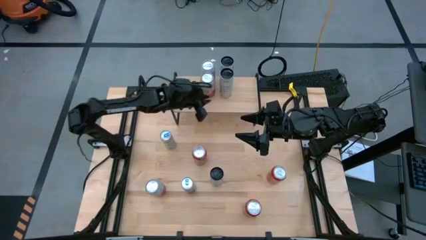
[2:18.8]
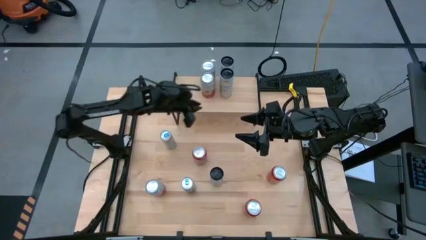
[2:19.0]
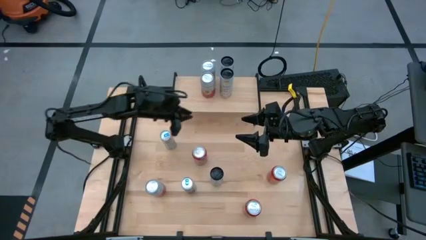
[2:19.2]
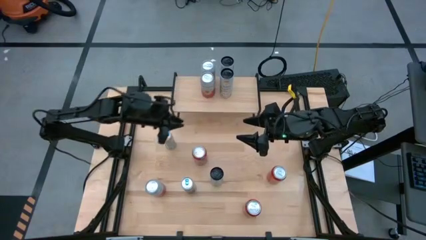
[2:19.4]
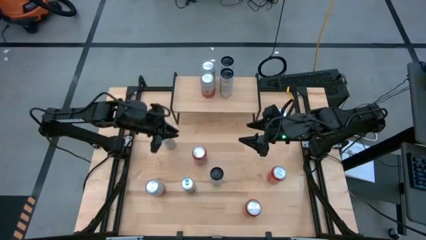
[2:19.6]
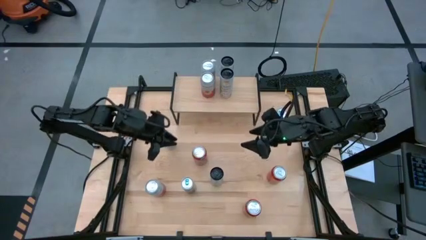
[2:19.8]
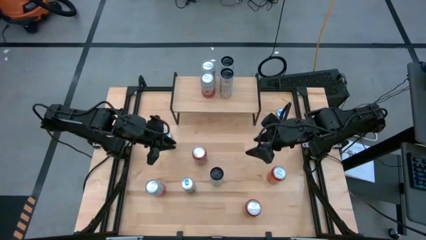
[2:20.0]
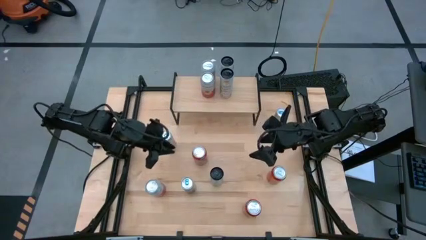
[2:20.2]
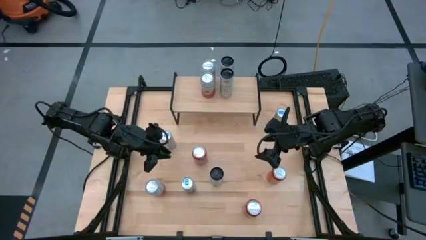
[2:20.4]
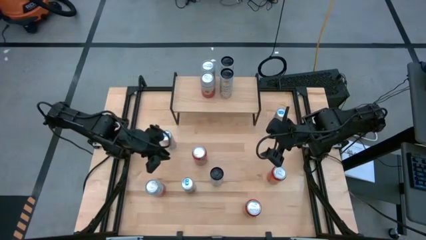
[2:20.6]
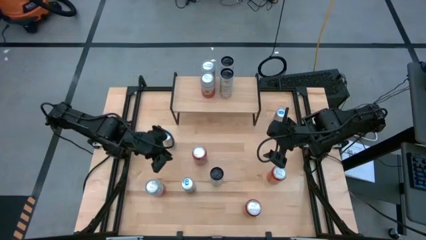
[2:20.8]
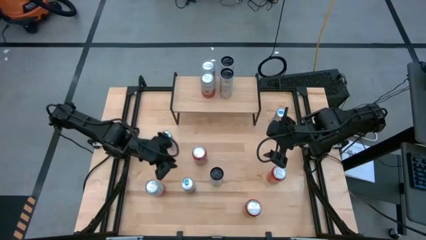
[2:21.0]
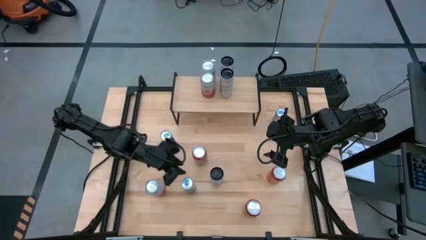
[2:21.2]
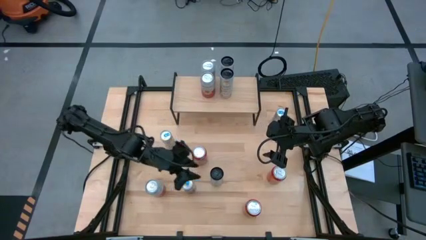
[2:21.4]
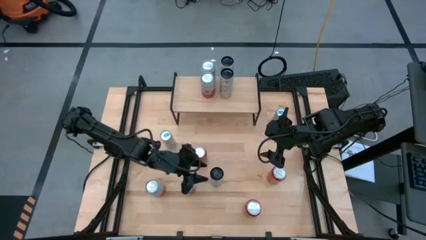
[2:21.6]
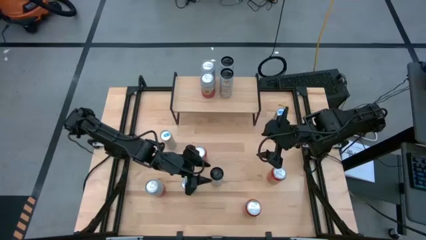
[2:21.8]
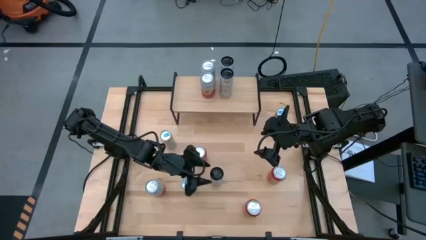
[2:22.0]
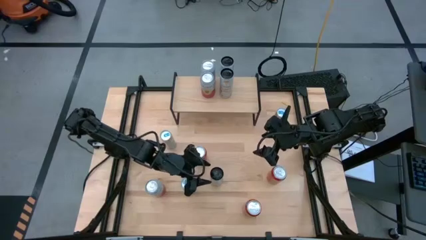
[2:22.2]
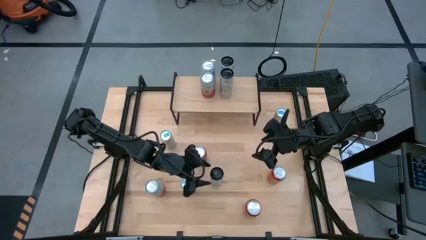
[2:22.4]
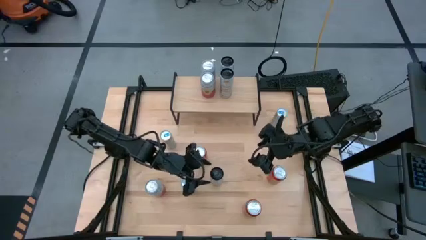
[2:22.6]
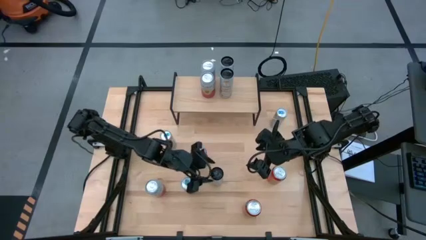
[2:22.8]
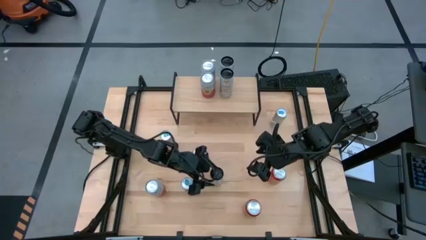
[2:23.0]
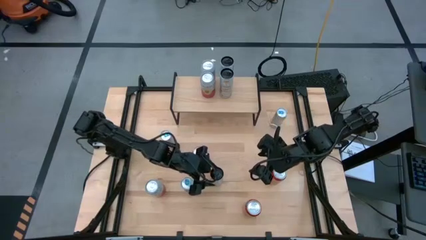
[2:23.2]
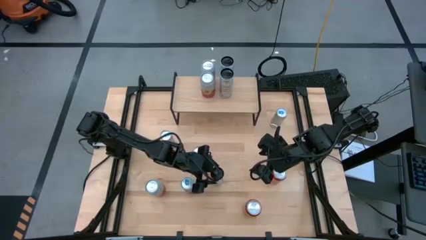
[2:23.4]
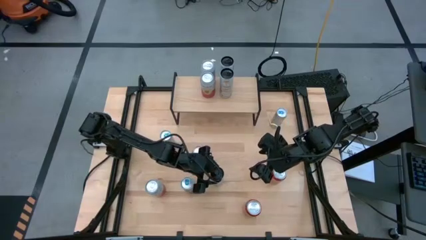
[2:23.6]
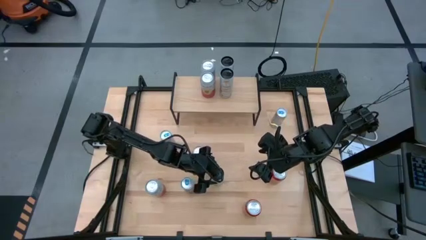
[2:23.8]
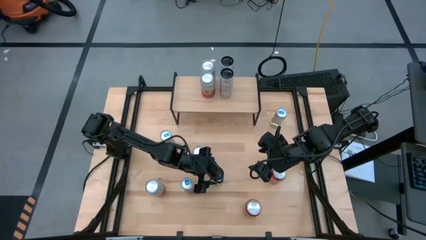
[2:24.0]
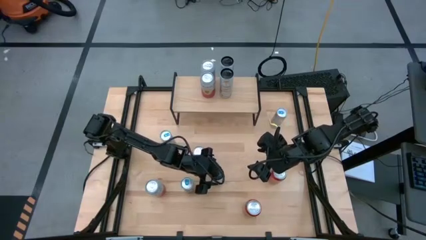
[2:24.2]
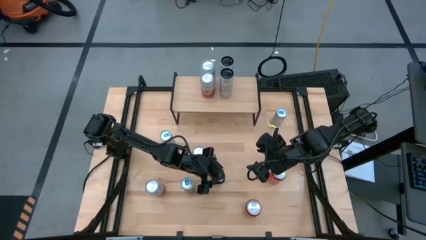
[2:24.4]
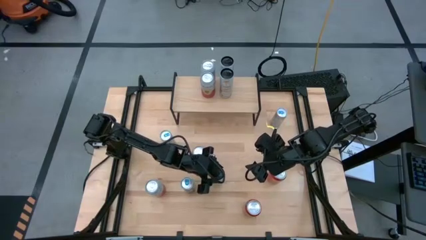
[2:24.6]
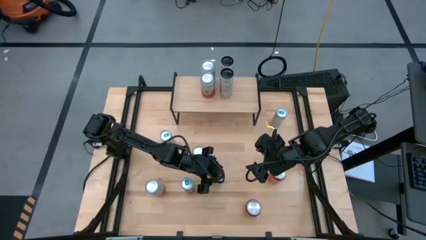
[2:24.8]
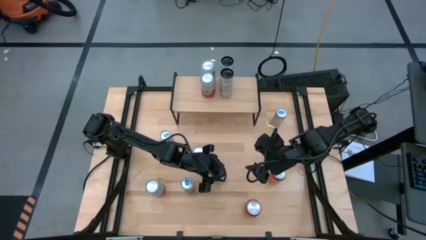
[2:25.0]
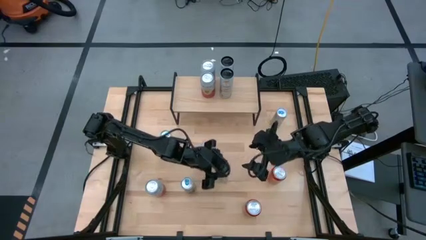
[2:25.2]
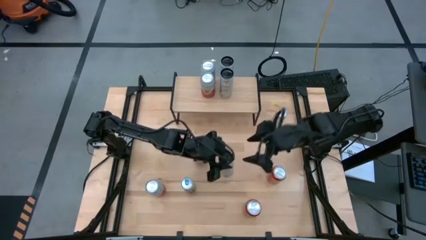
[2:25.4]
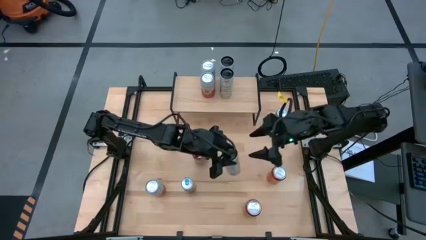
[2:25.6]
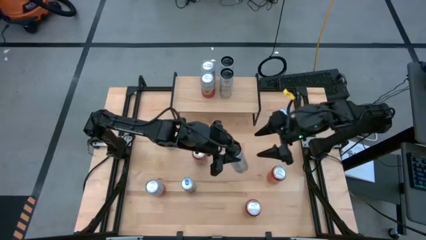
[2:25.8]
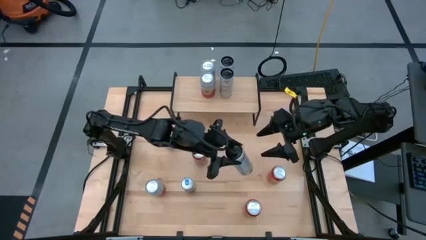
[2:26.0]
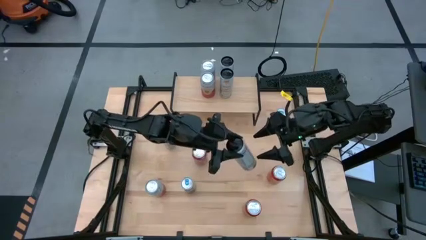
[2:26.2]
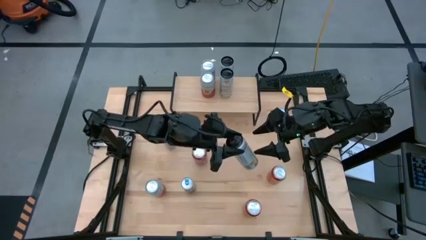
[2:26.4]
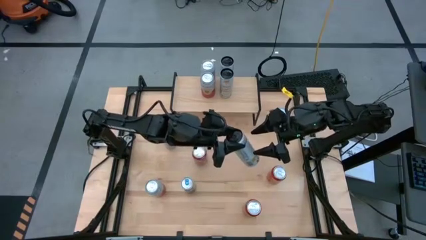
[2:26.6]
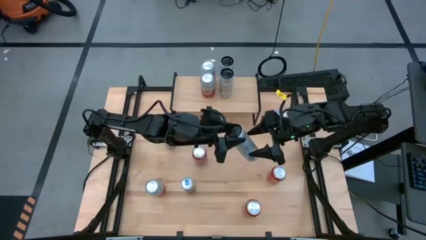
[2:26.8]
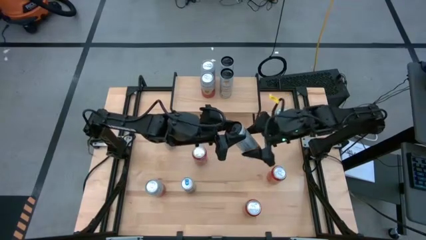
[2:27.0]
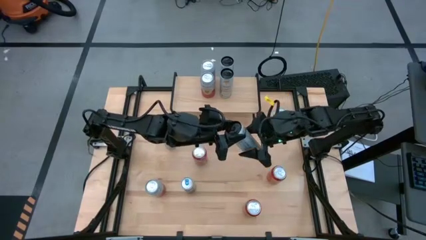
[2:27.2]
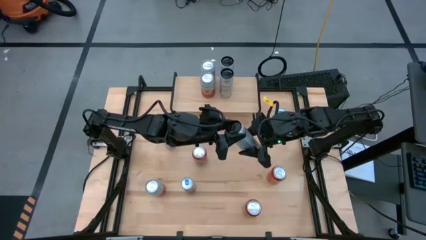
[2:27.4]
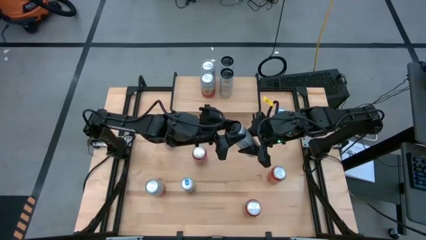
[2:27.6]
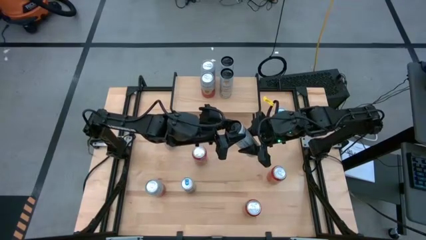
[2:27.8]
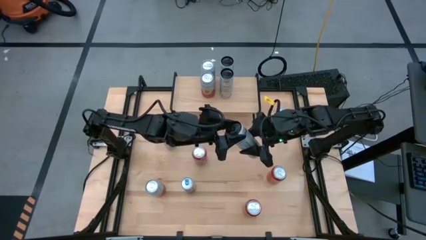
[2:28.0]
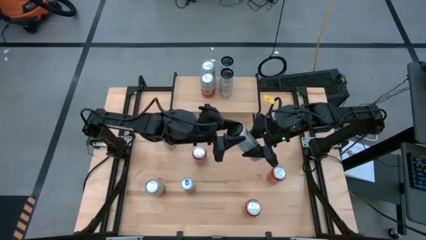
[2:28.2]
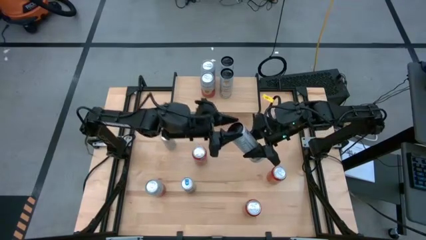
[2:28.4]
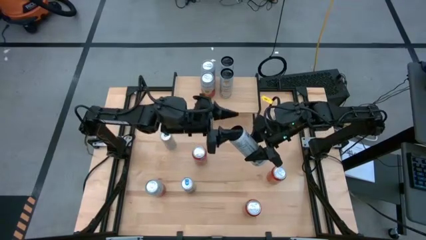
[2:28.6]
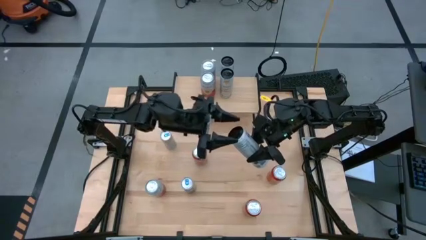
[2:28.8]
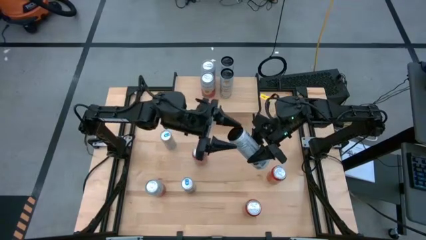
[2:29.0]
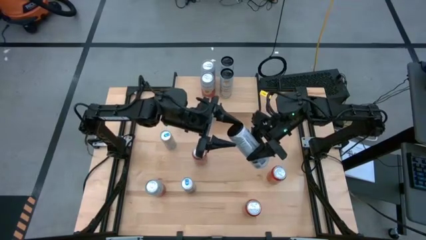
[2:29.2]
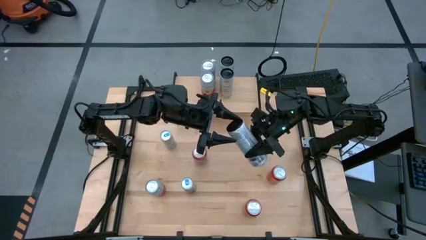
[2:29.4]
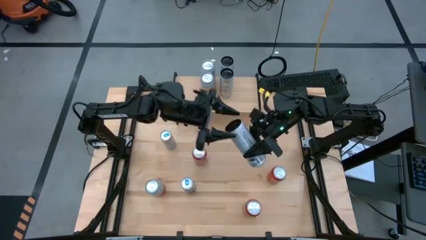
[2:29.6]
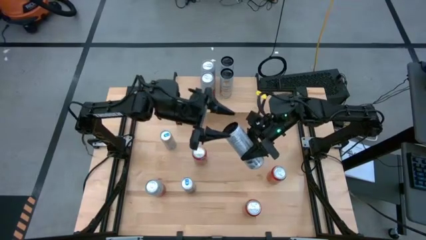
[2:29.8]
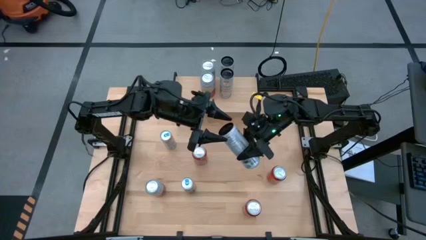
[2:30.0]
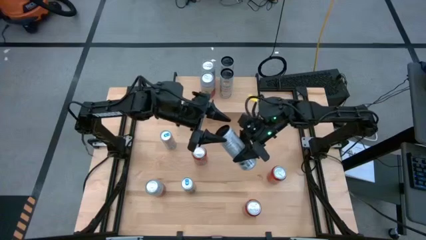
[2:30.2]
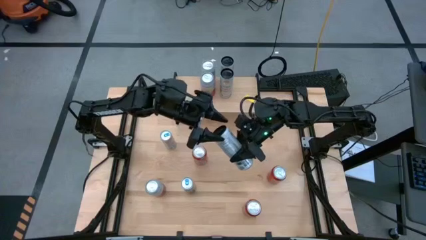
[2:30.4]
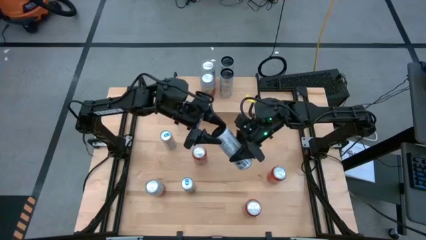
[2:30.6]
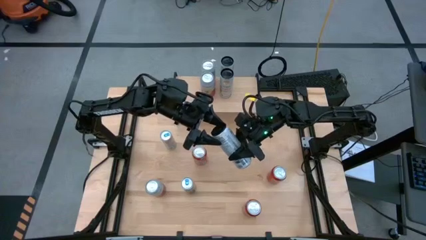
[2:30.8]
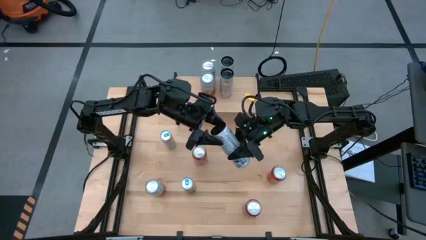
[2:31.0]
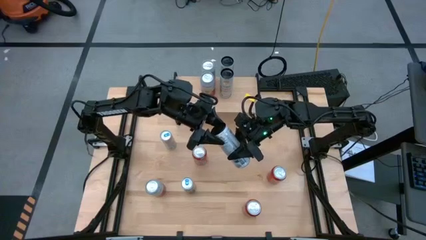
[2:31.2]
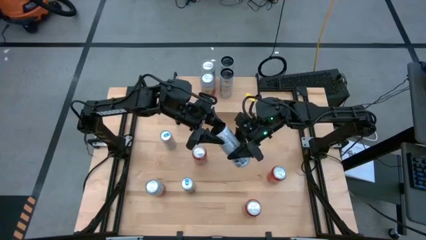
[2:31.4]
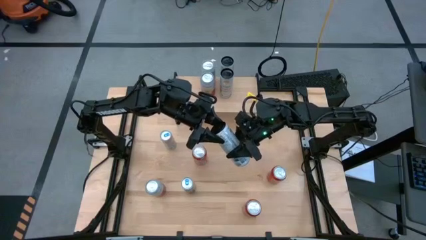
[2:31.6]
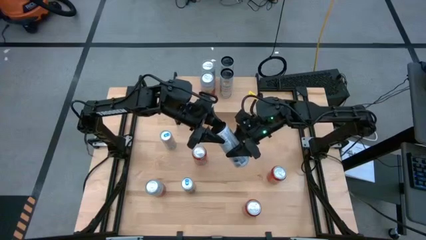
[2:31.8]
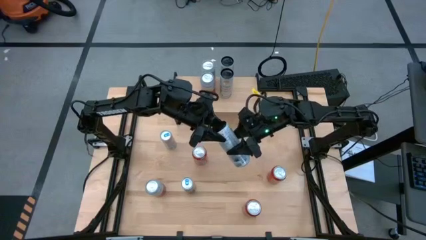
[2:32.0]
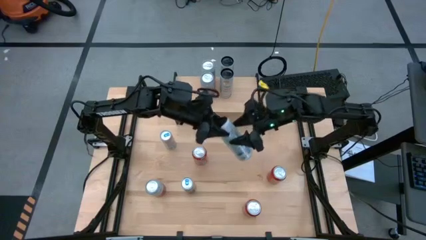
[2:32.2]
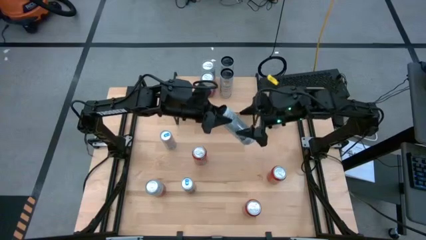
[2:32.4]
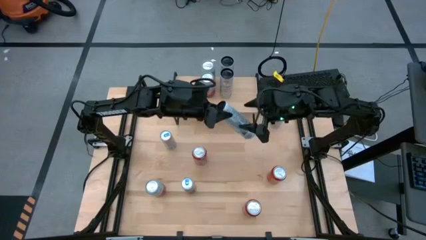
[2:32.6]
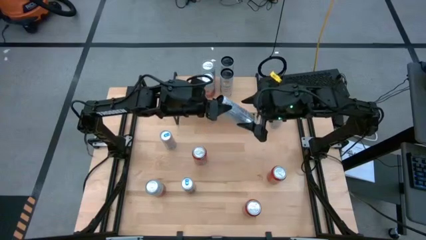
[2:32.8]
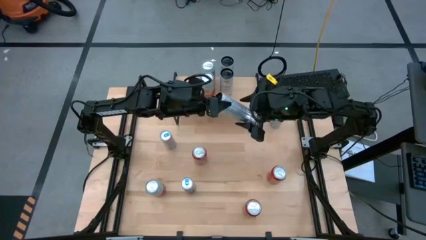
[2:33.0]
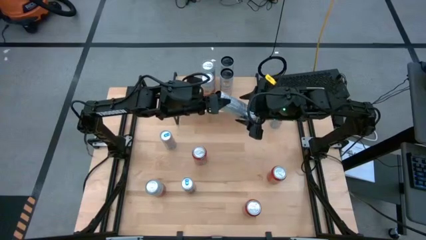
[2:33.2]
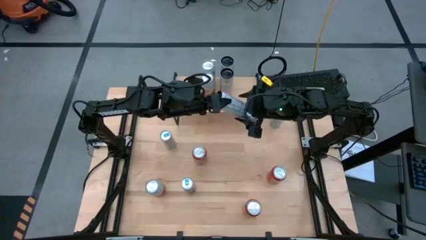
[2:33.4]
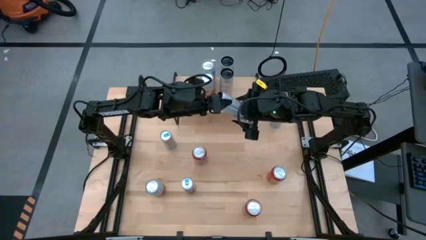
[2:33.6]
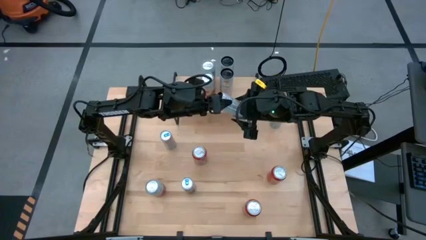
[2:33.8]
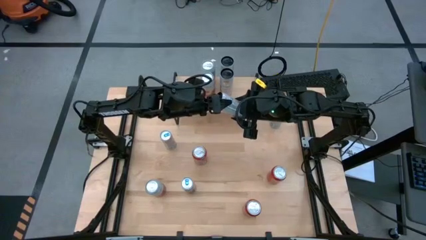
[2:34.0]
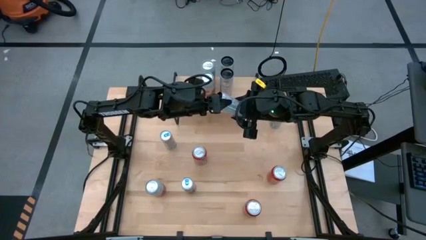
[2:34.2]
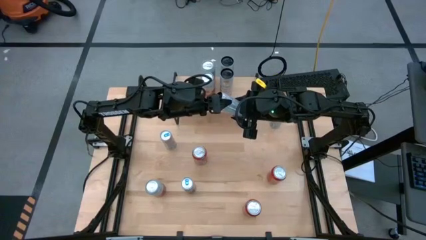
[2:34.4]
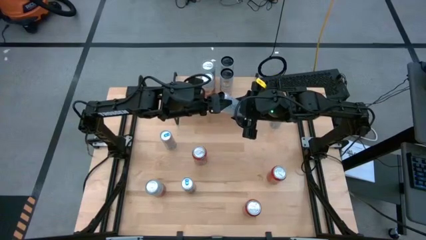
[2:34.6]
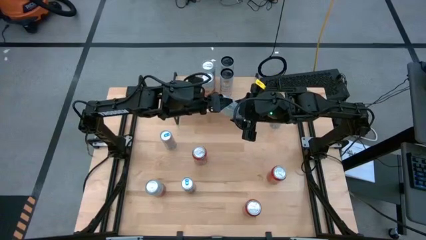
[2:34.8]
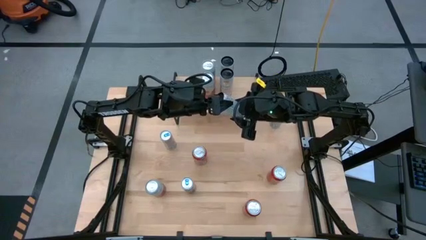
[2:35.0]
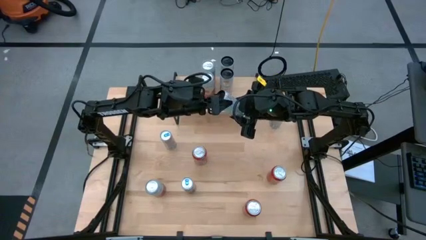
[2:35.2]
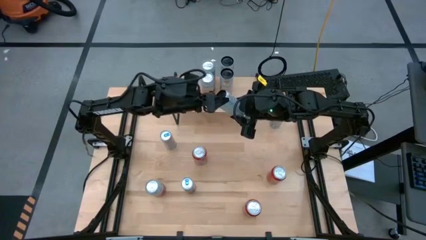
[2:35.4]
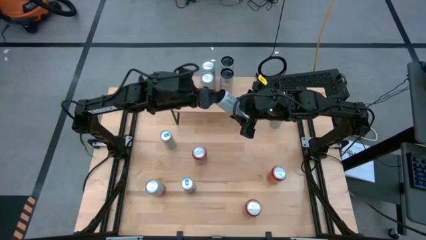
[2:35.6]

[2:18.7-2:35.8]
Task: Place canned beverage on shelf
Put the white-yellow soda can aligned with the other white-yellow can on the shelf
